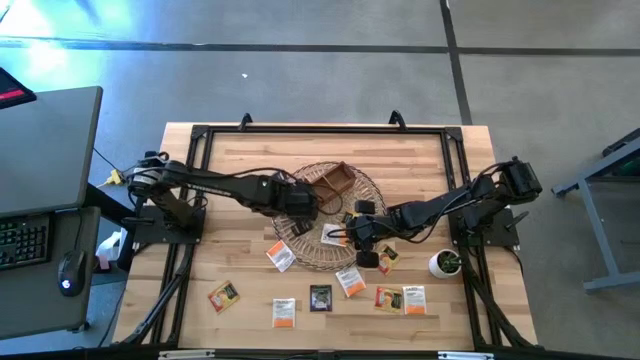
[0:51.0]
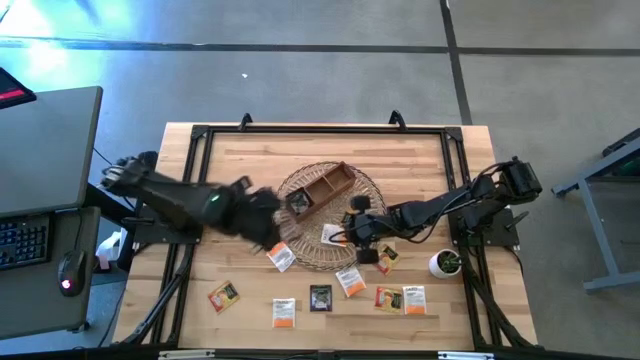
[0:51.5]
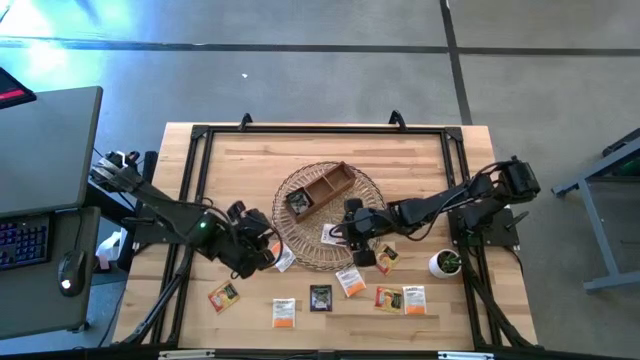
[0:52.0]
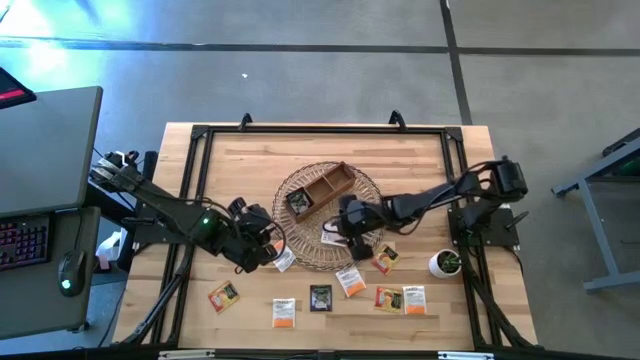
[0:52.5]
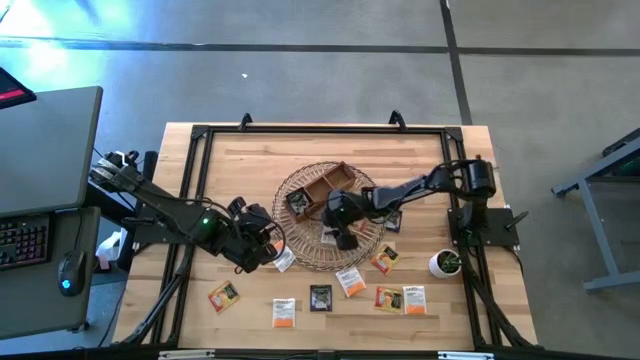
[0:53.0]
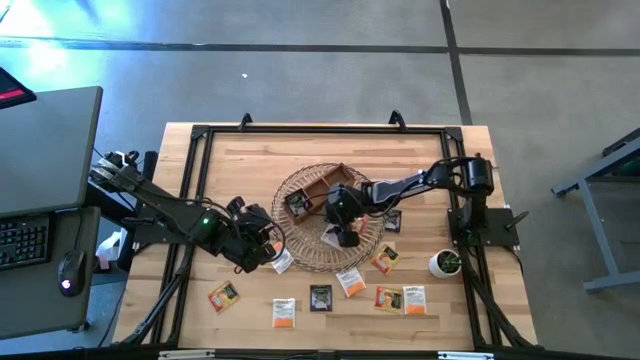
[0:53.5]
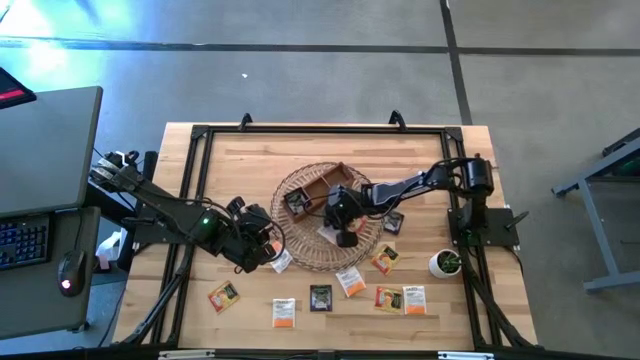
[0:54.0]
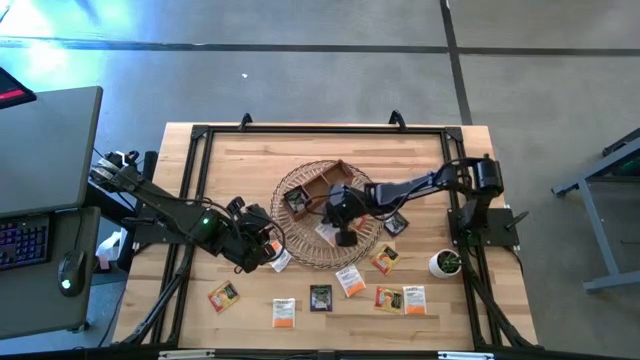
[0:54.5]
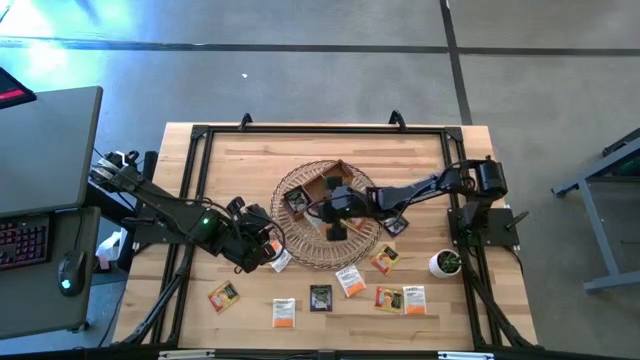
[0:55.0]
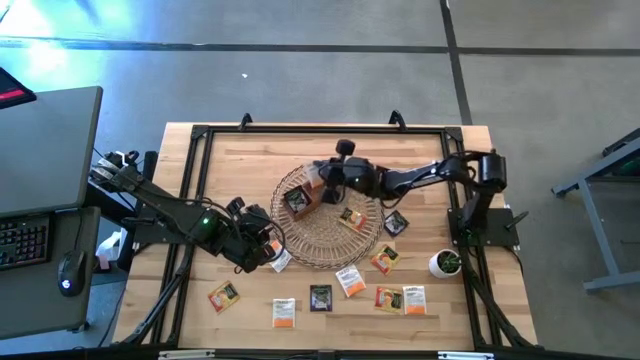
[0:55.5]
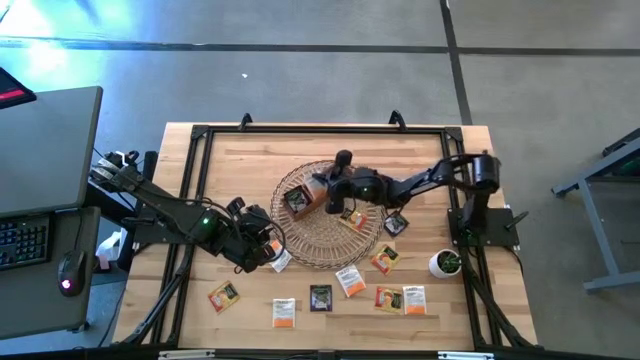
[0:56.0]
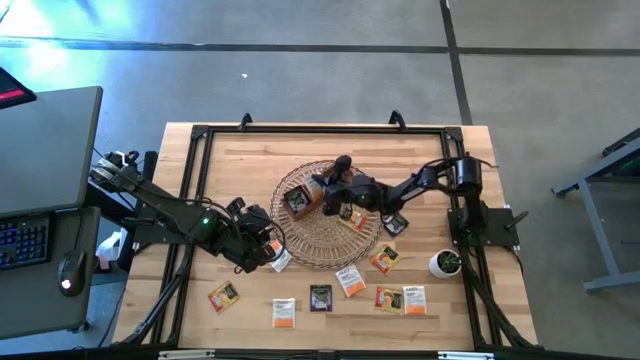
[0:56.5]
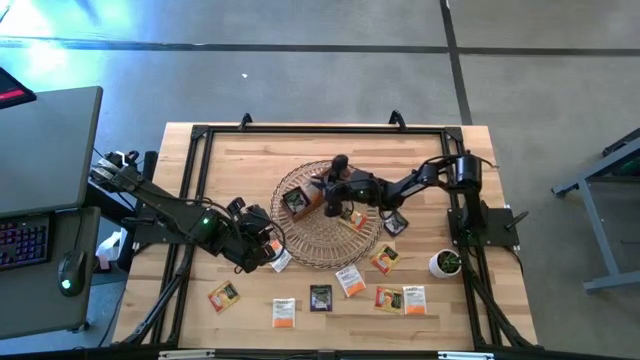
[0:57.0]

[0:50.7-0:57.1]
Task: Pick & Place Tea
Put the white tea bag into the middle section of the brown wooden organizer

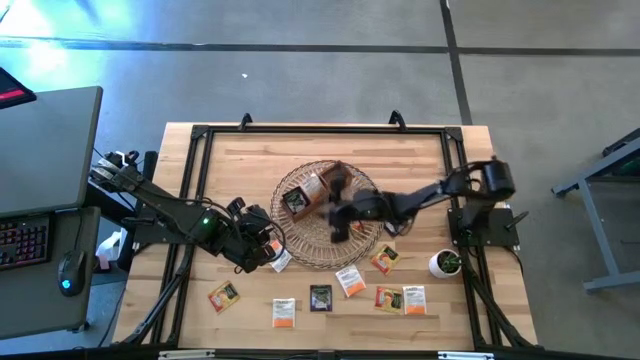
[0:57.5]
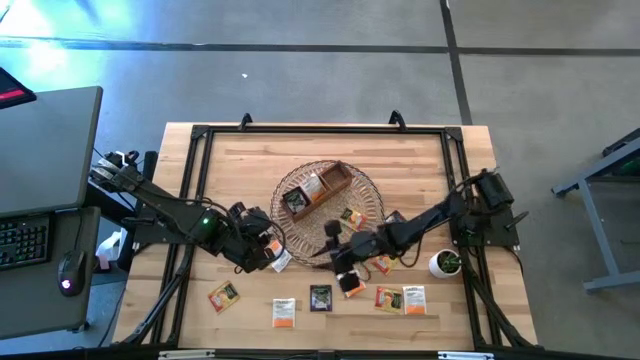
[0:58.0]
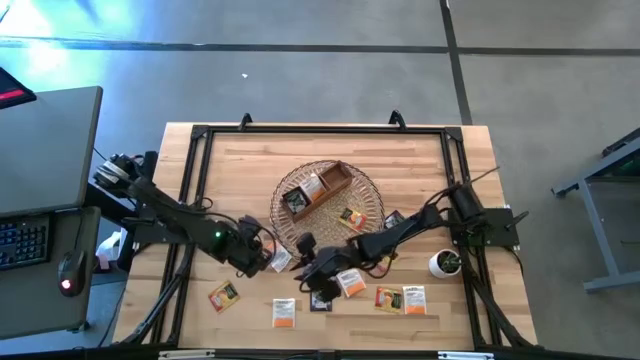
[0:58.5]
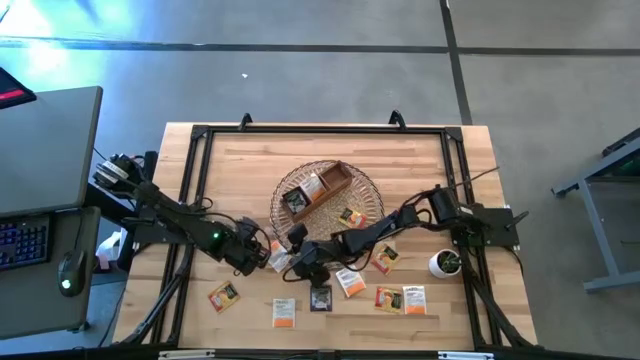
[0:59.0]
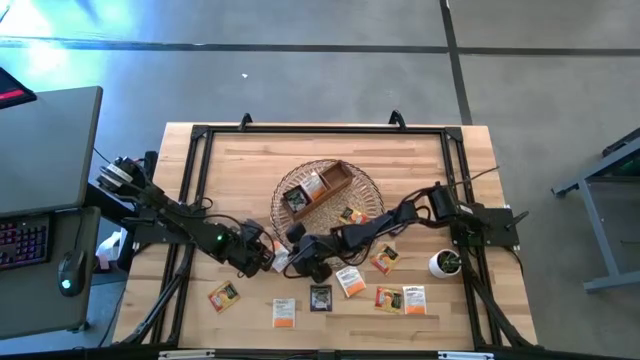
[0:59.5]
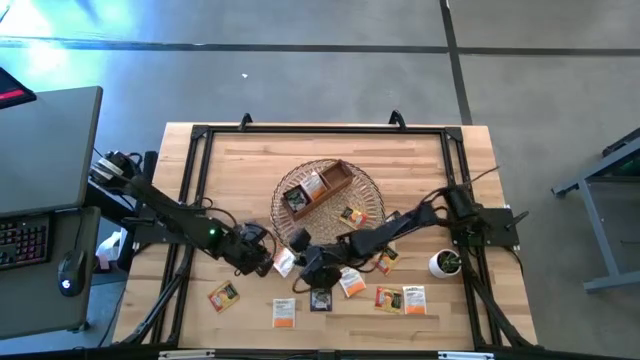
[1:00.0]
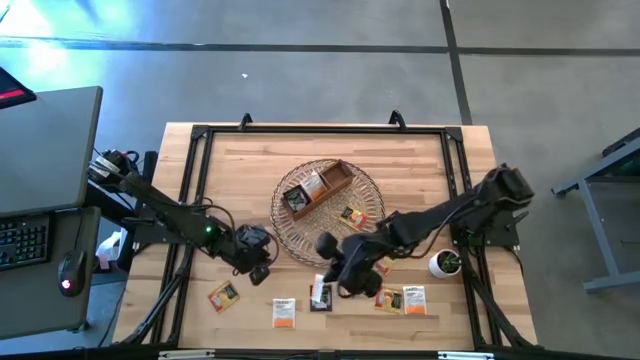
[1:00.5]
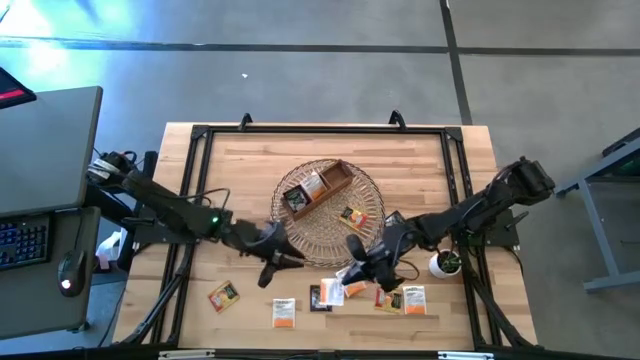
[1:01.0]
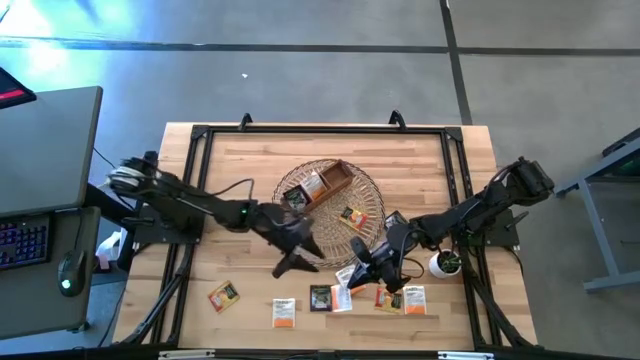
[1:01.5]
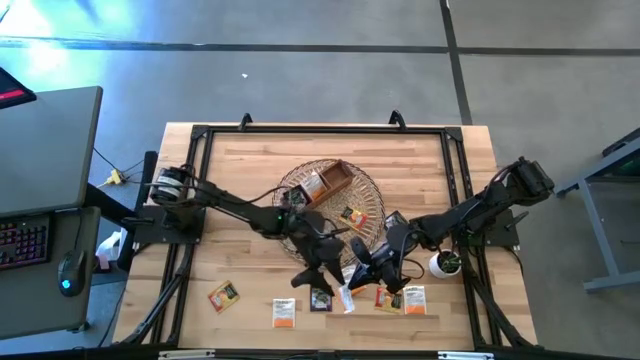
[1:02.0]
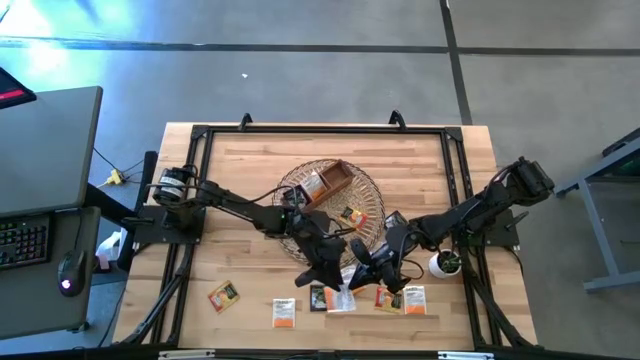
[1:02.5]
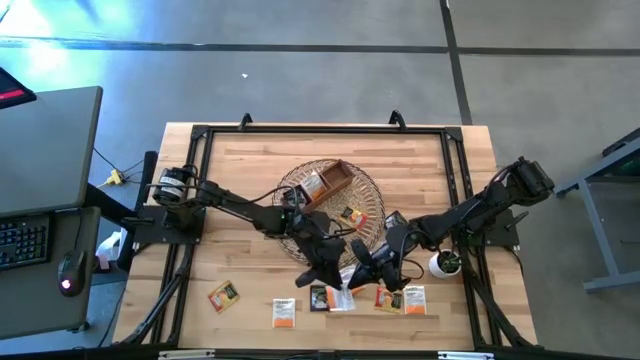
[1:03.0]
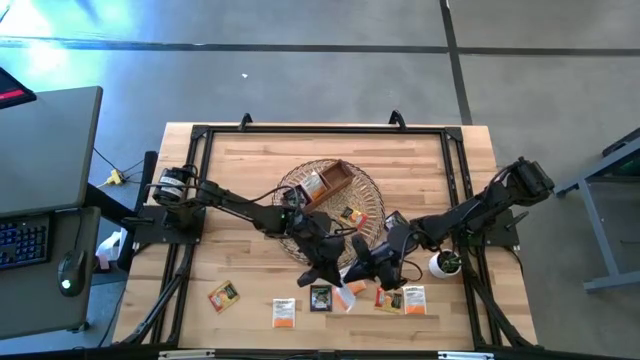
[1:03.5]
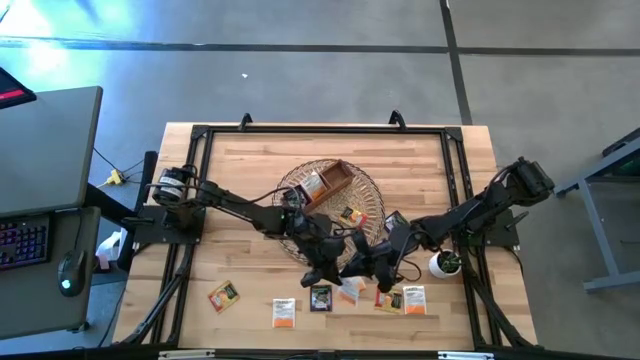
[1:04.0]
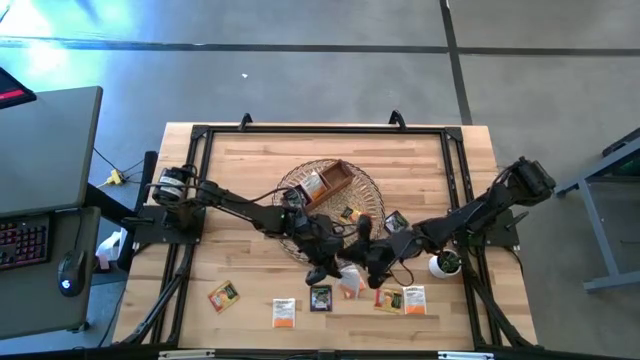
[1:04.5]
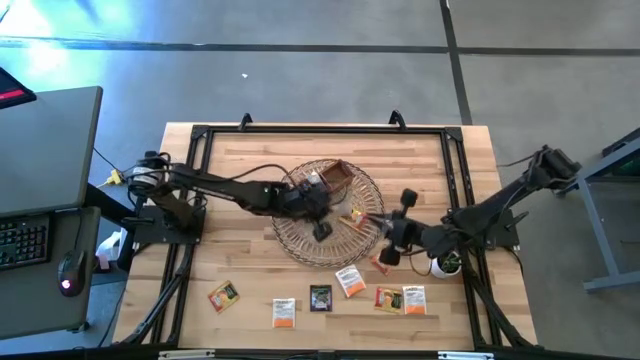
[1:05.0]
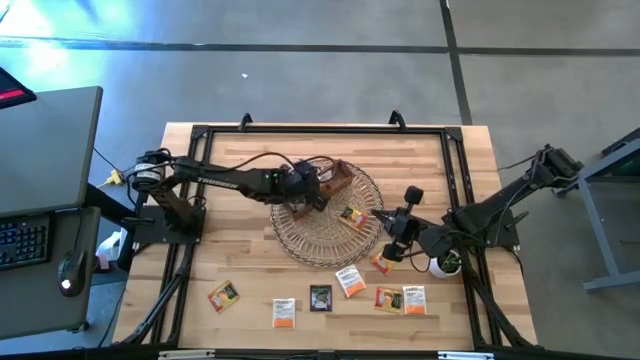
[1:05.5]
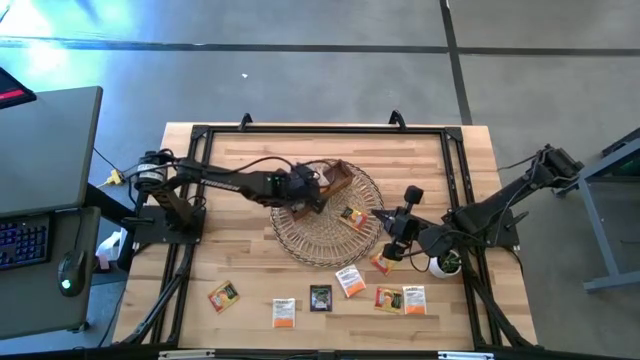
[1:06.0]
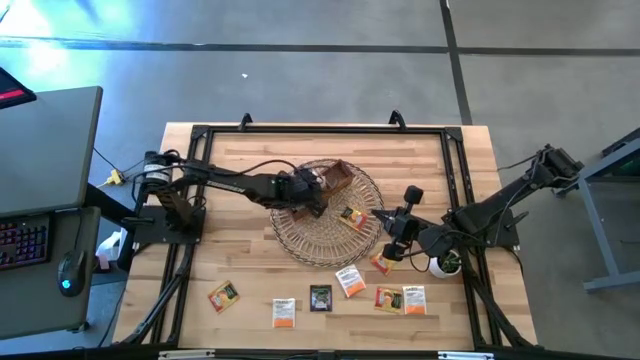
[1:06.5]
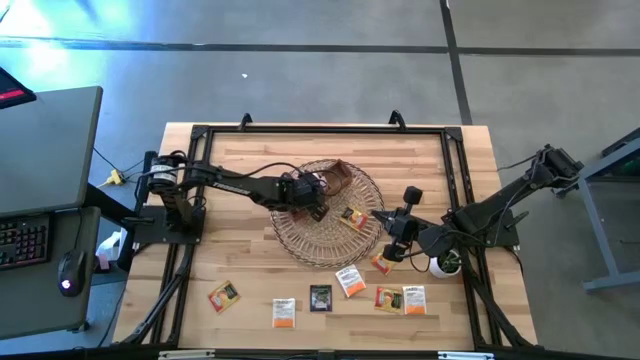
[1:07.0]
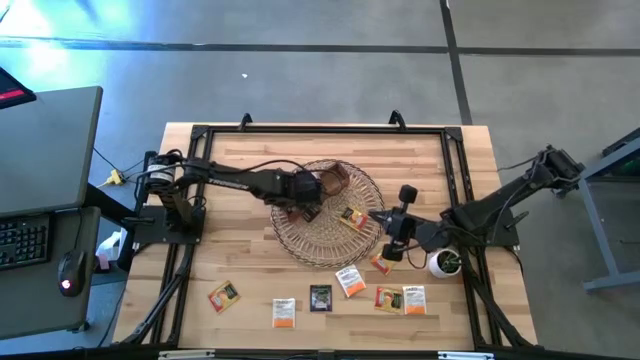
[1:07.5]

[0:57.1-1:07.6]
Put the white tea bag into the middle section of the brown wooden organizer

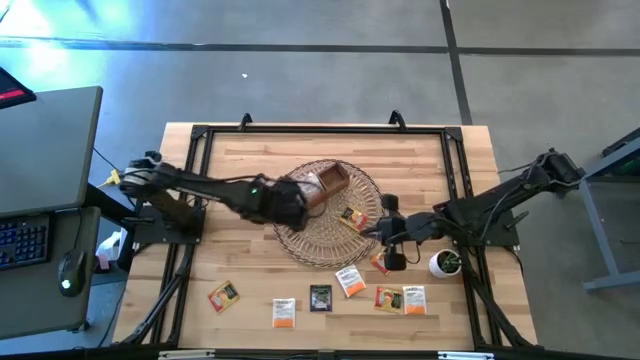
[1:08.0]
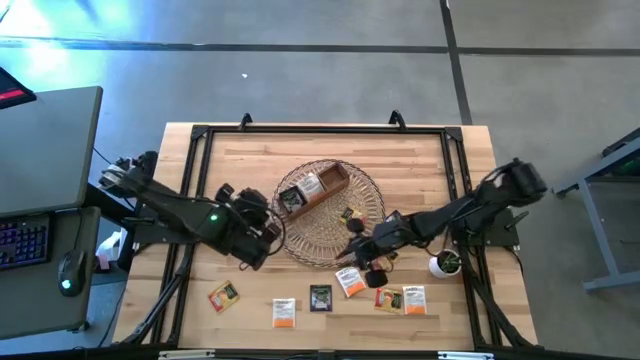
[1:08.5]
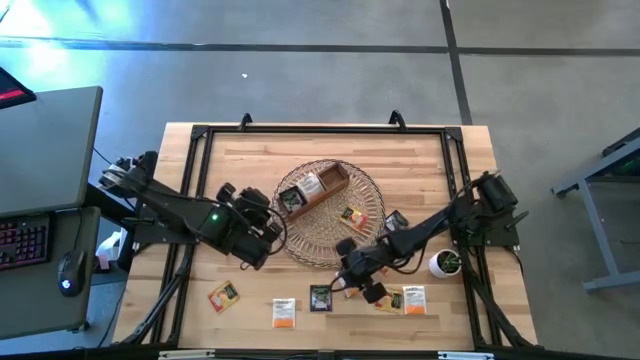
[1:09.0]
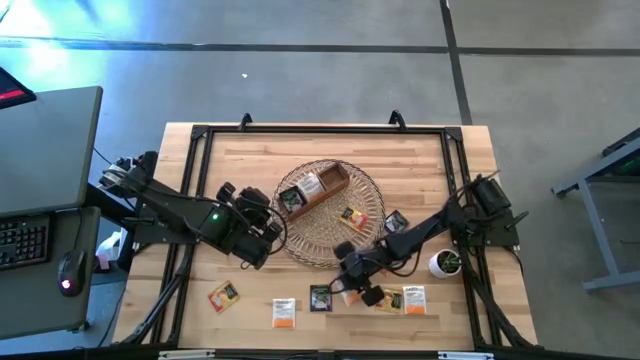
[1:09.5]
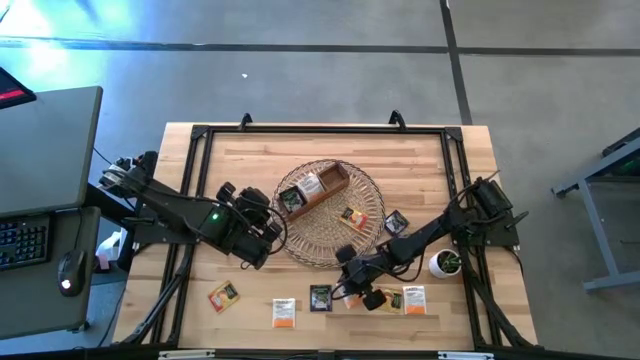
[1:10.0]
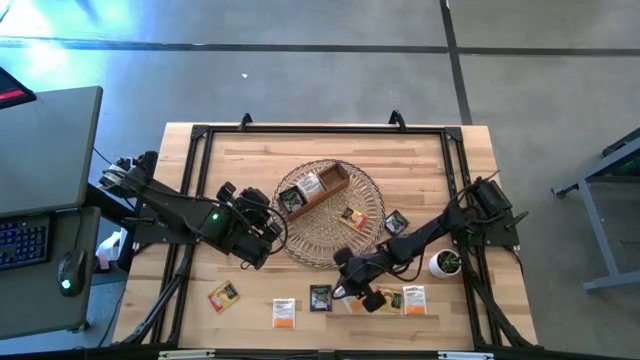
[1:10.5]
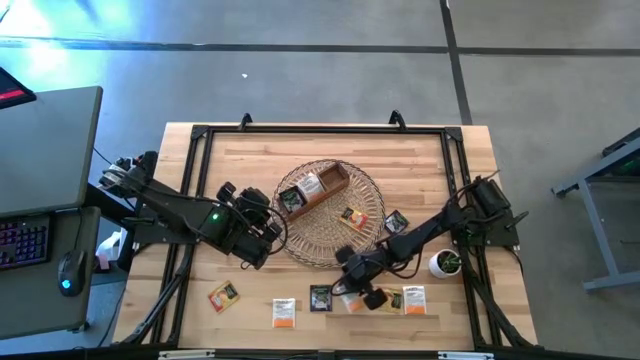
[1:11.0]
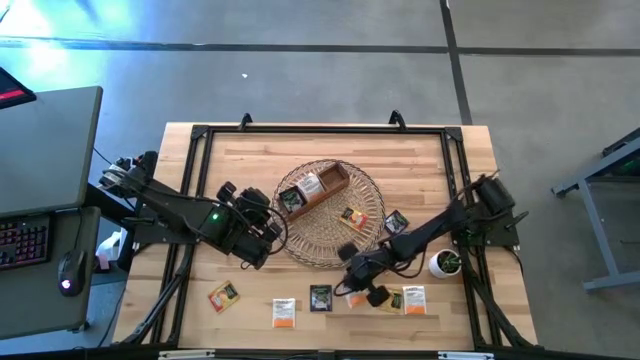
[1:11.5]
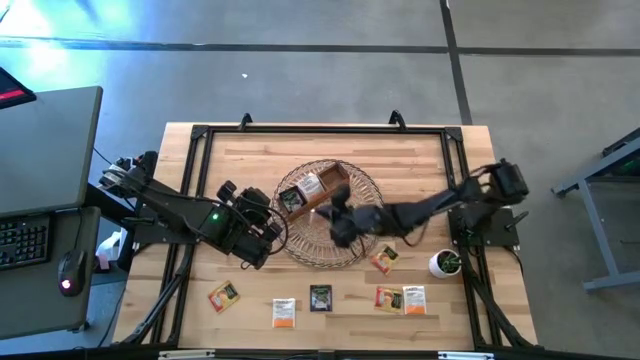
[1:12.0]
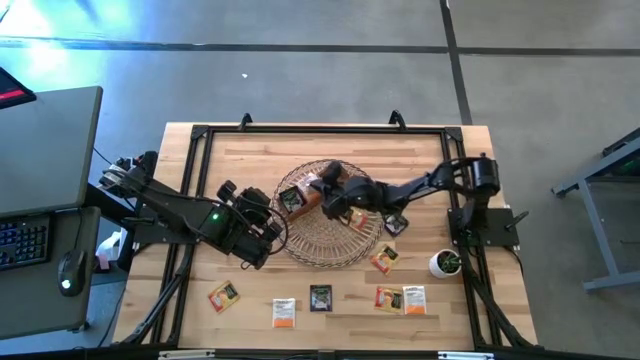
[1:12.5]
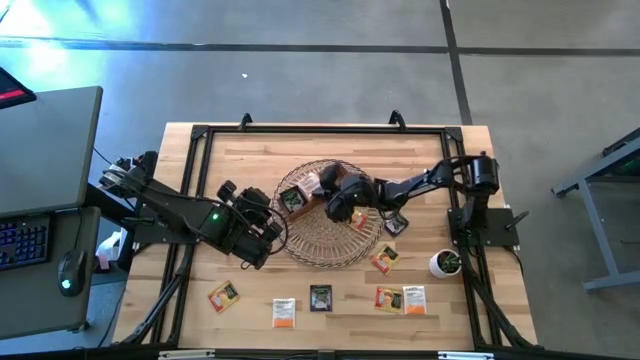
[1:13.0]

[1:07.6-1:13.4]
Put the white tea bag into the middle section of the brown wooden organizer
